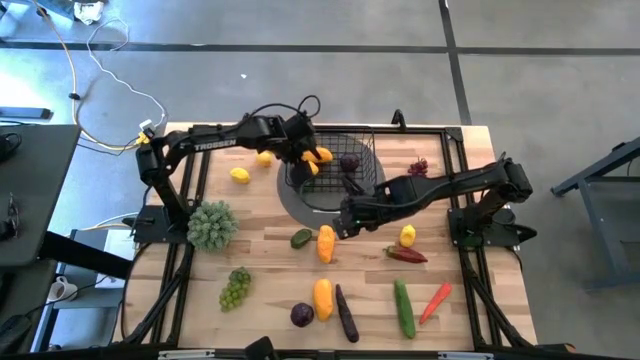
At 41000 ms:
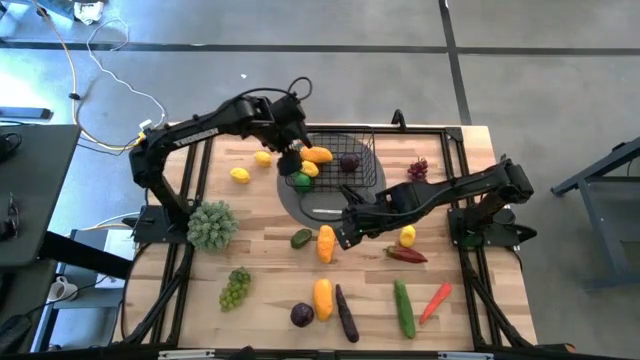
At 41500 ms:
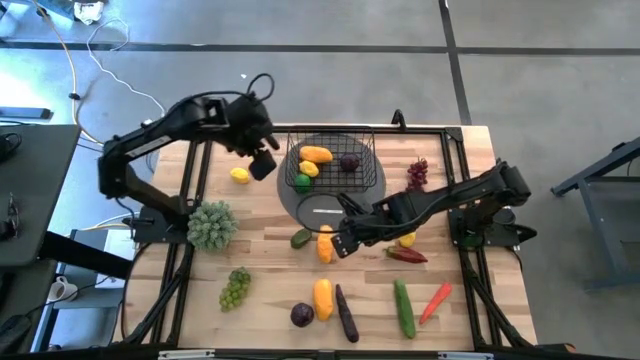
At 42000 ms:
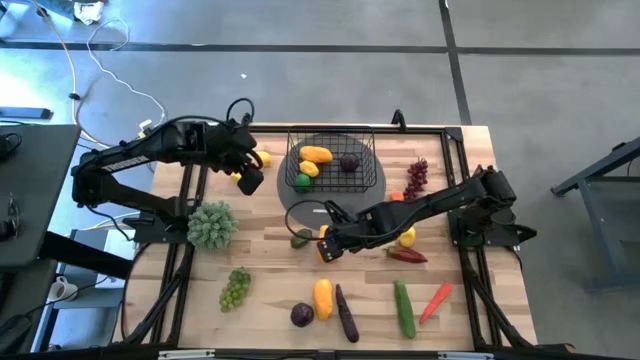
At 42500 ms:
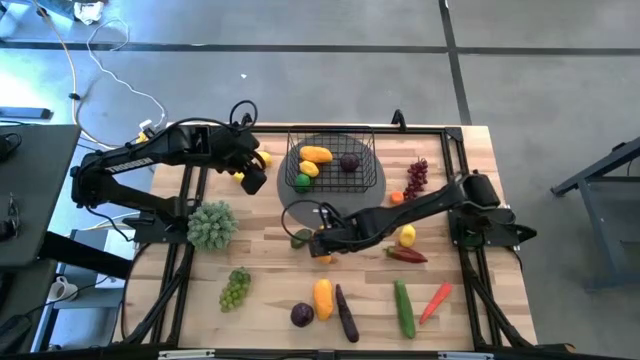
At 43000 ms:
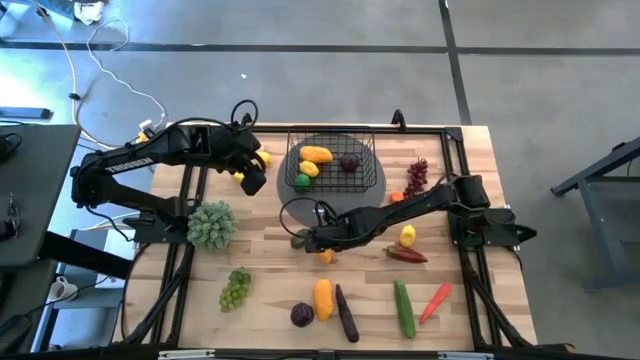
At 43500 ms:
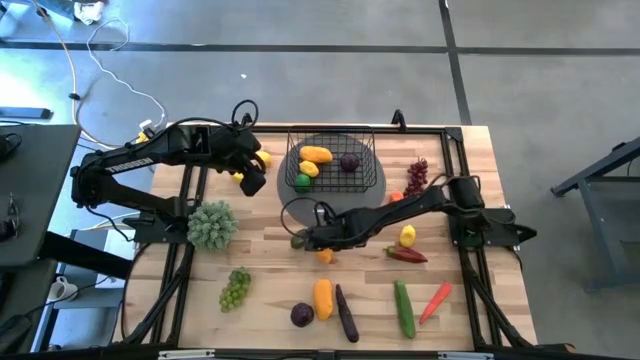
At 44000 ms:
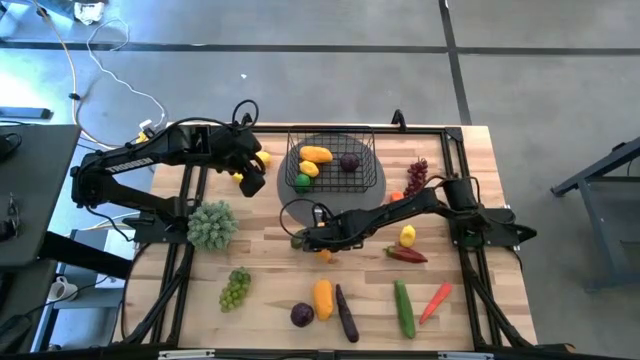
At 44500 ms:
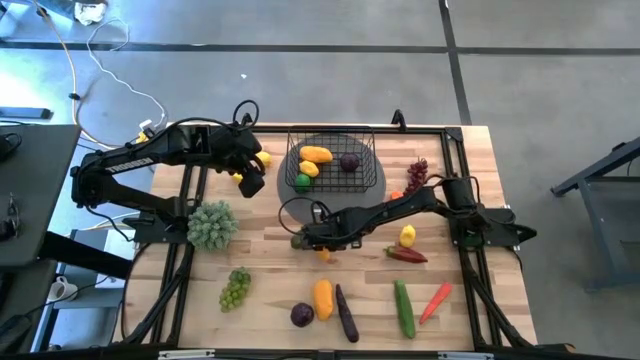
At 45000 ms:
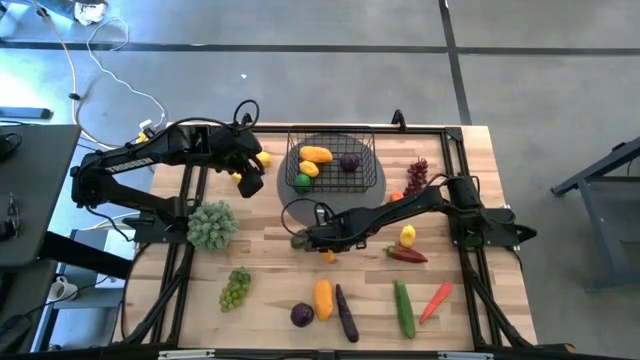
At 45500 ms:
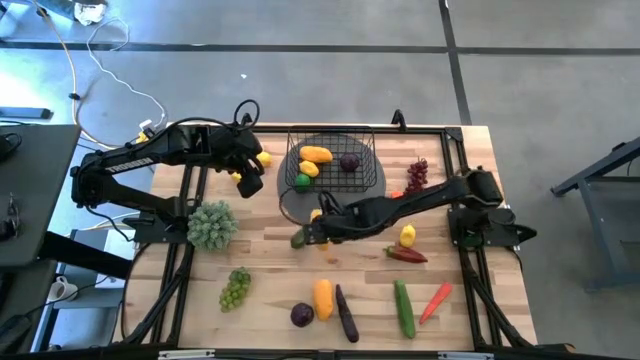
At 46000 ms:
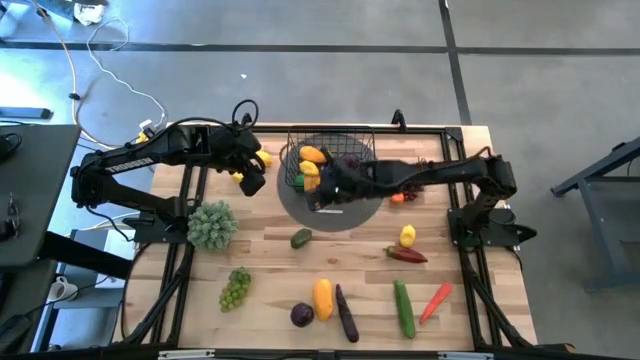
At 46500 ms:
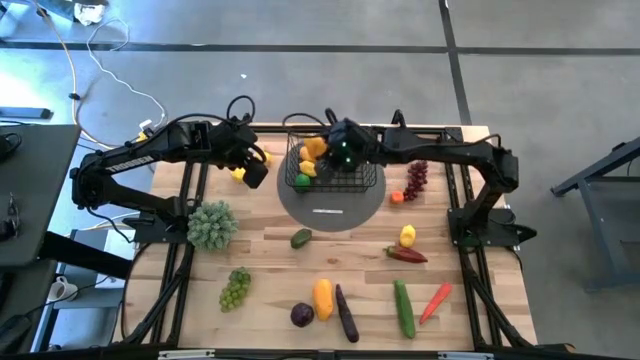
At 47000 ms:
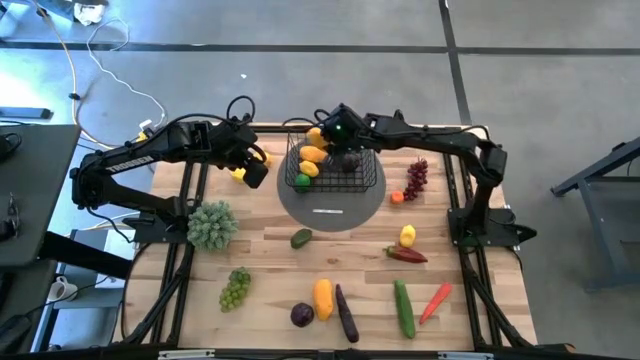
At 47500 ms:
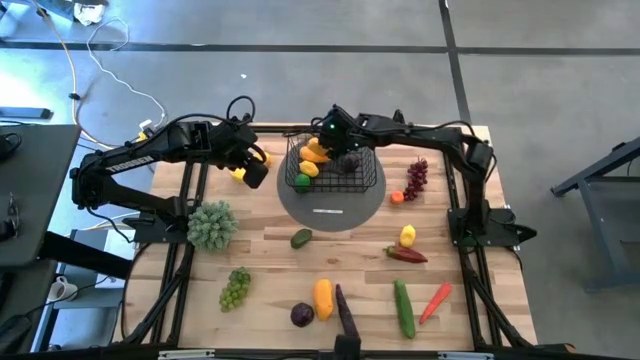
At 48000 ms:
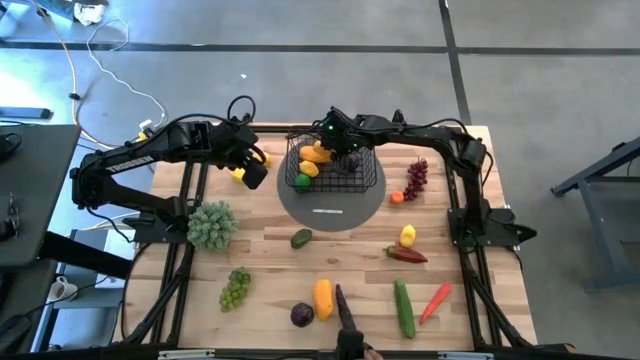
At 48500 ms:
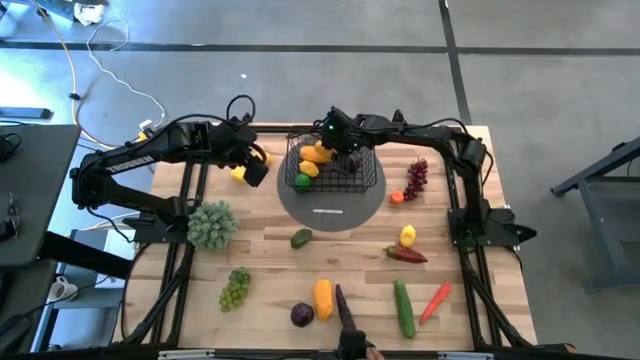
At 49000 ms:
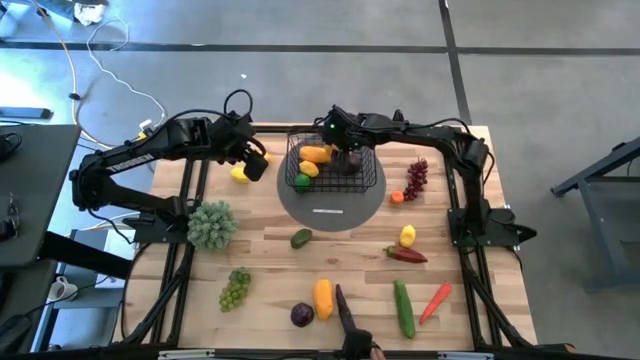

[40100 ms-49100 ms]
Task: Build produce basket
Put the yellow mango into the wire basket

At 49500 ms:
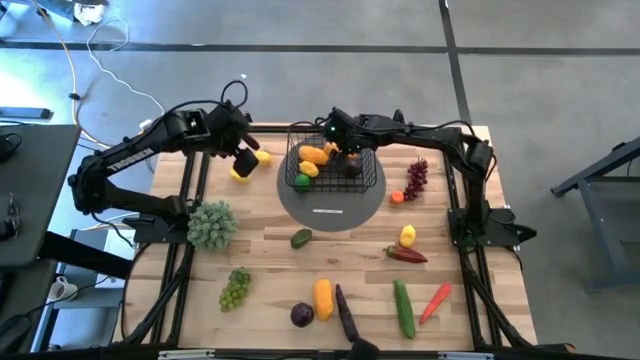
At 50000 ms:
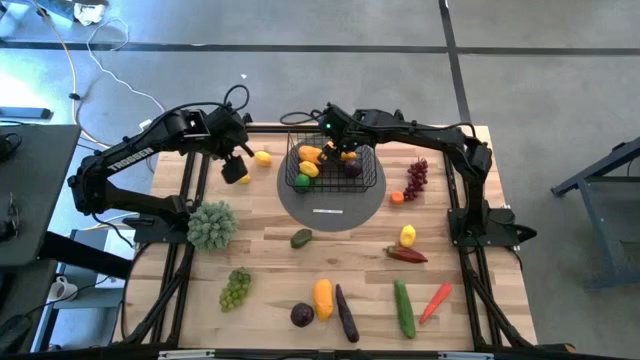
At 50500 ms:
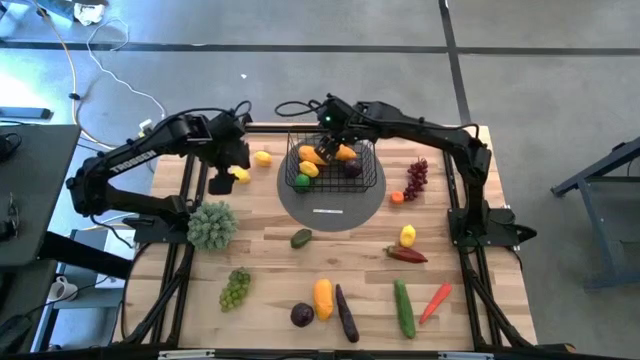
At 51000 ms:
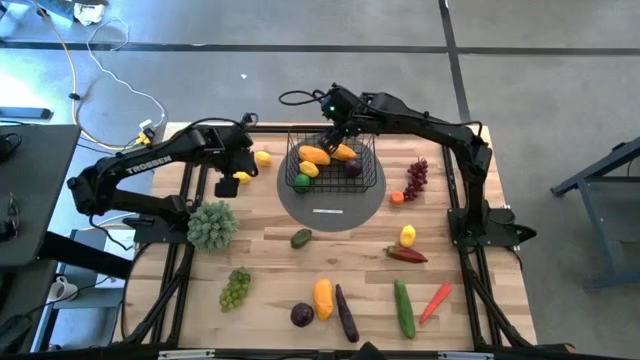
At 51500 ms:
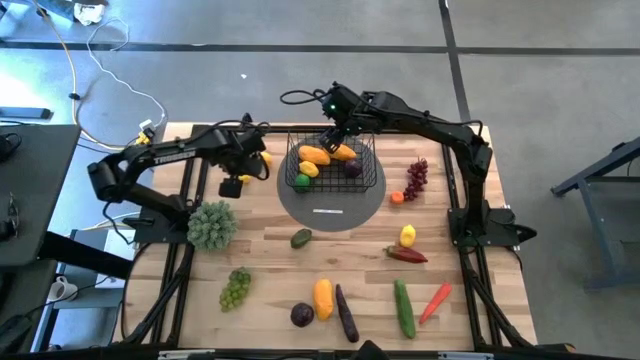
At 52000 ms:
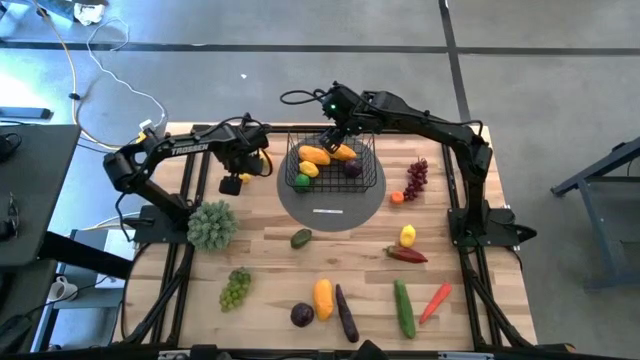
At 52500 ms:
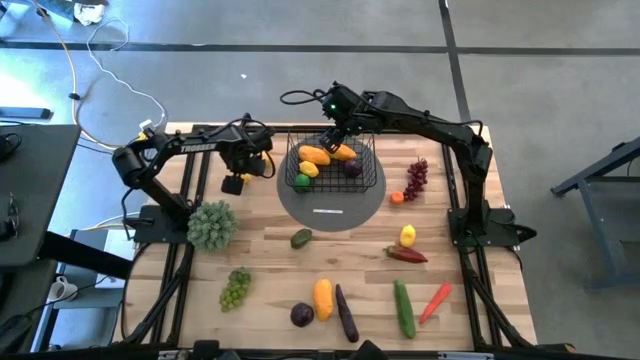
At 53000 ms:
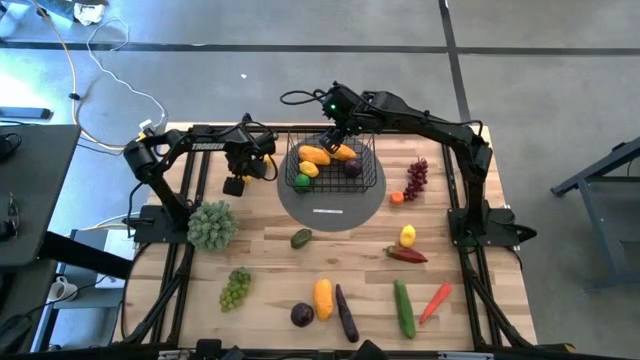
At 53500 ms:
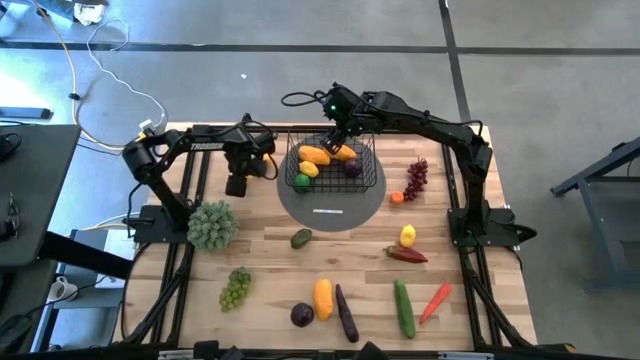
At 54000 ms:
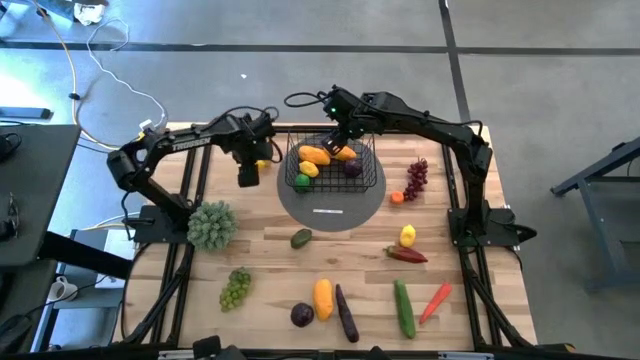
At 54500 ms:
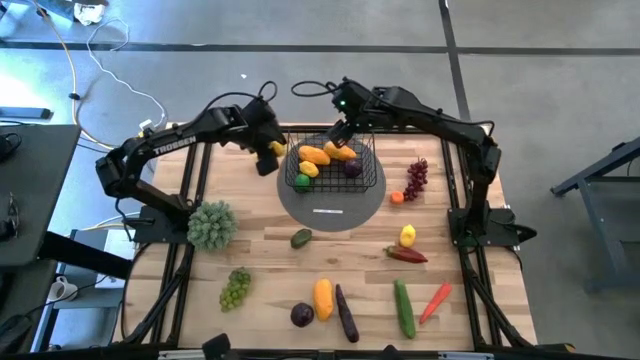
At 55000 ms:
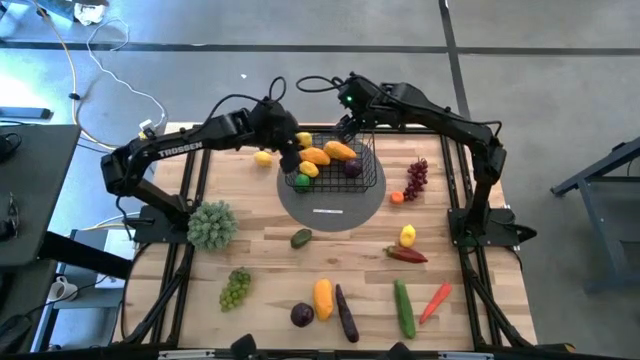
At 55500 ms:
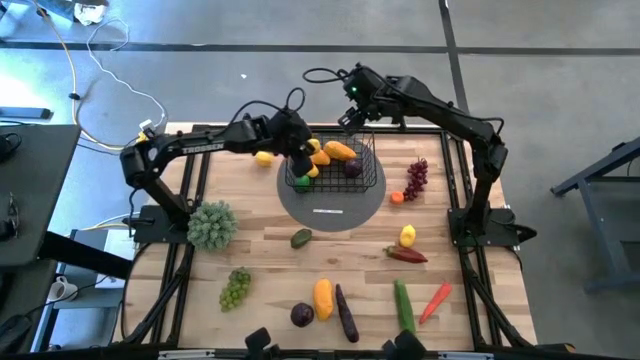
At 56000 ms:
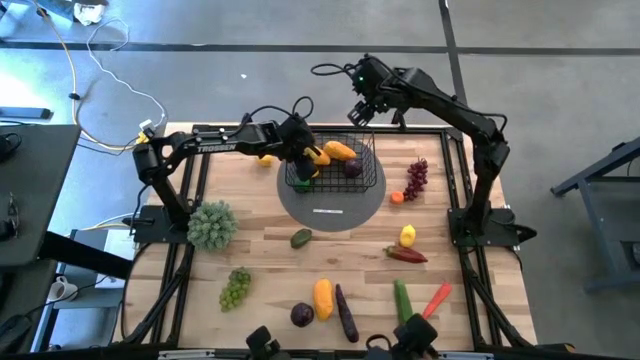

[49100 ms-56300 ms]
Put the yellow lemon into the wire basket

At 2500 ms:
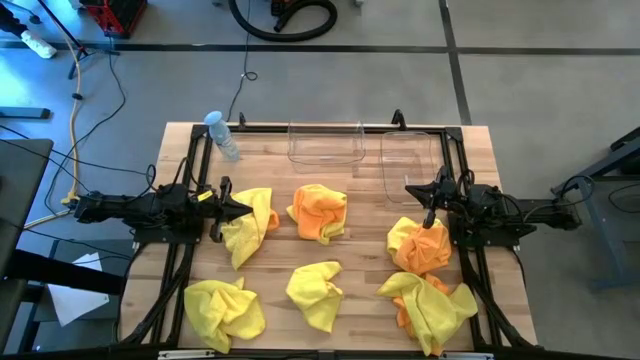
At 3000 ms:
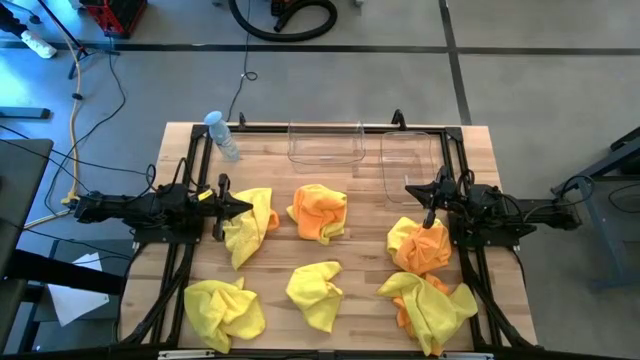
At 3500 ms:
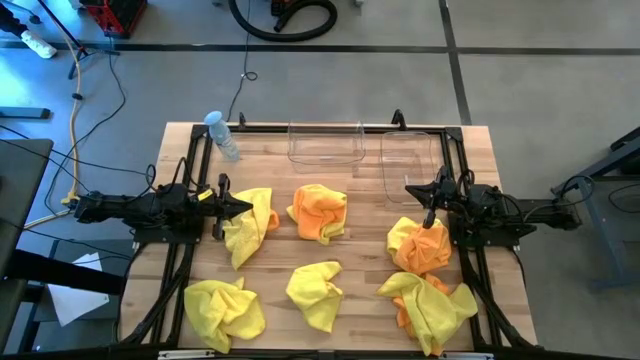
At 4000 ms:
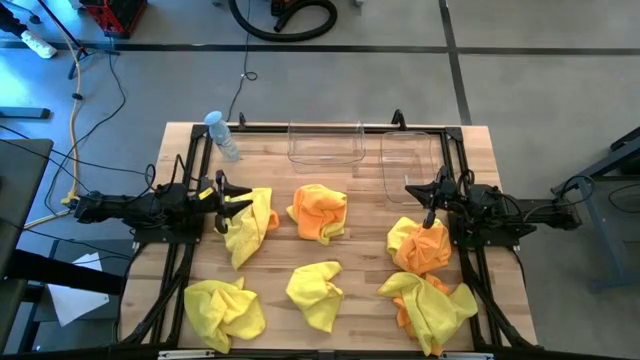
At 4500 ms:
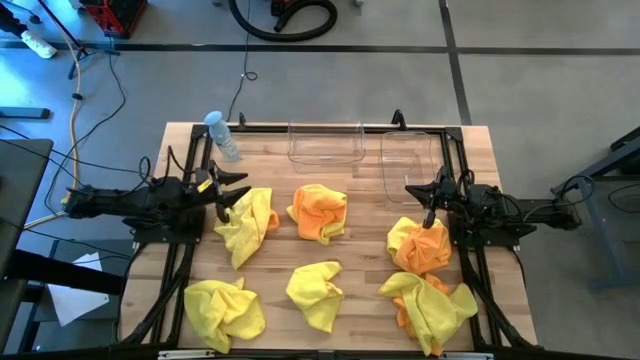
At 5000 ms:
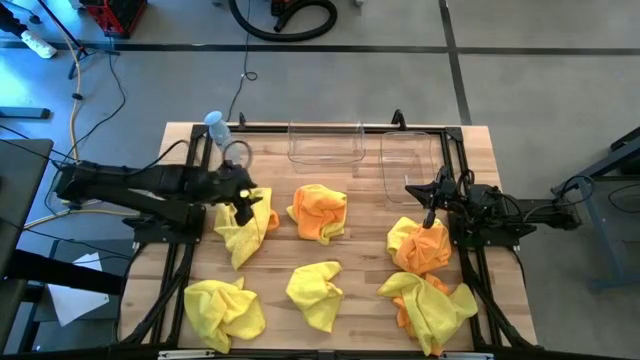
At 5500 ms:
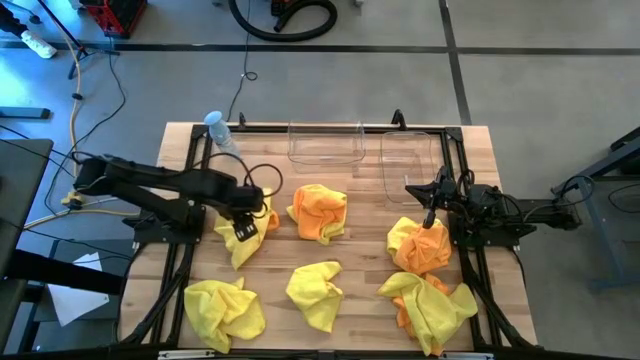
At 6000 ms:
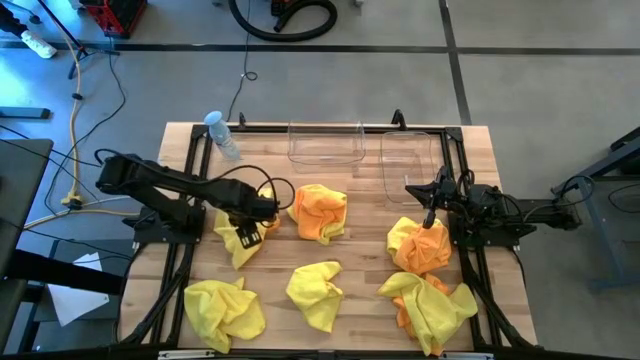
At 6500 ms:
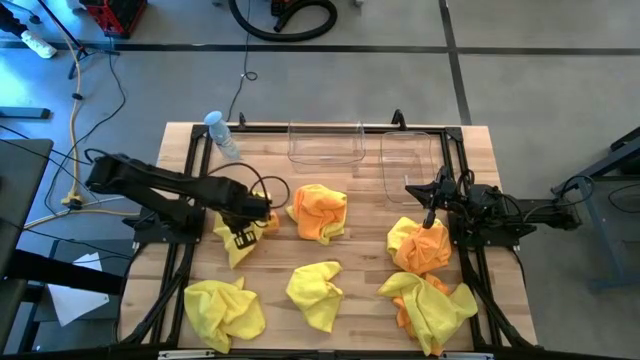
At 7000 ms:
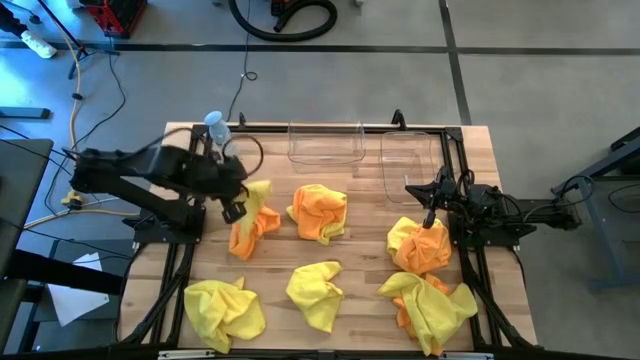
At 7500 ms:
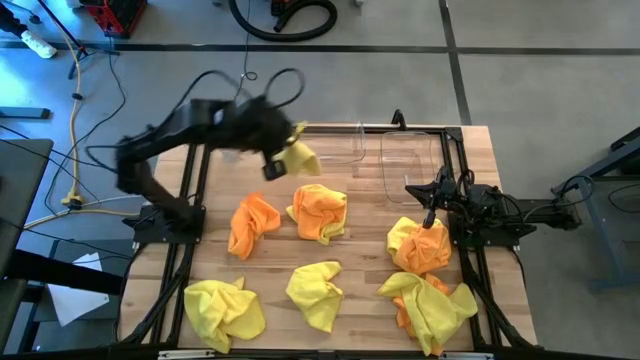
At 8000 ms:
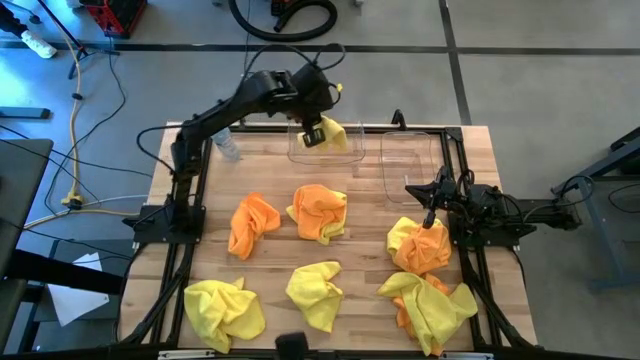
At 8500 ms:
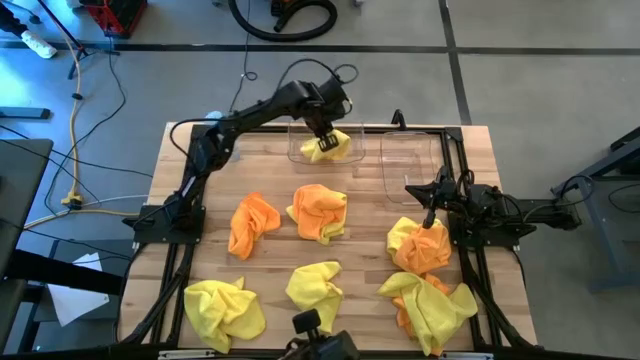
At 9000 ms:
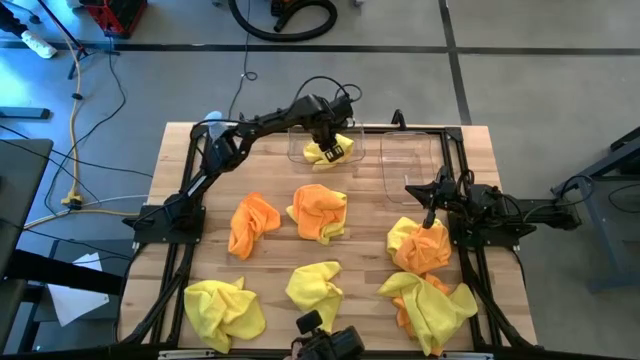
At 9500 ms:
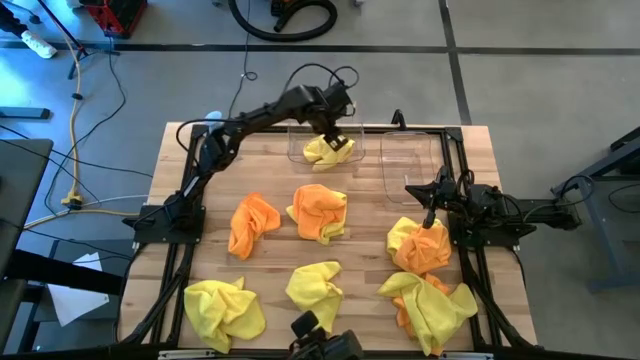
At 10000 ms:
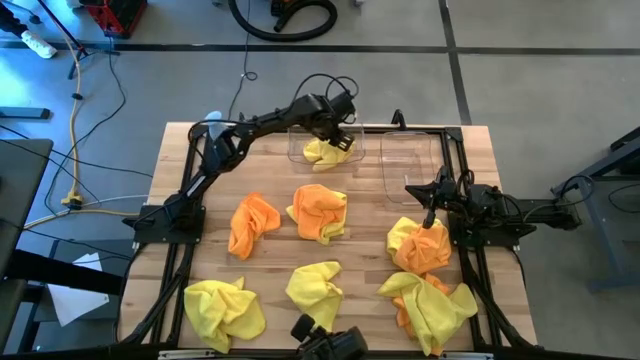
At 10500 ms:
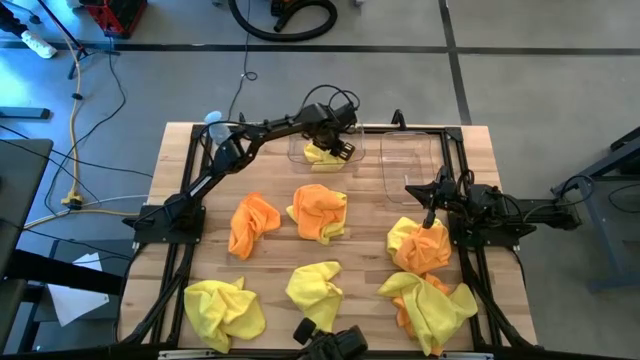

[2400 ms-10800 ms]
Task: Sort microfiber towel by color & place in baskets
Put the yellow microfiber towel into the left transparent bin
